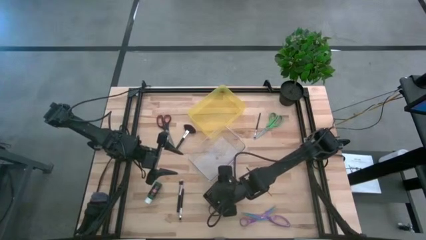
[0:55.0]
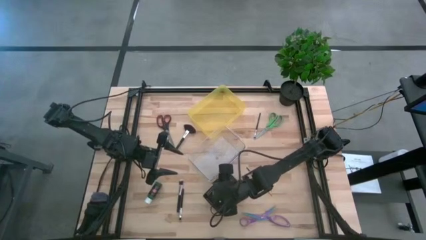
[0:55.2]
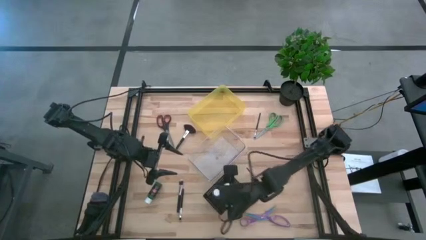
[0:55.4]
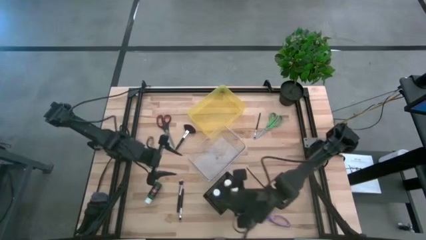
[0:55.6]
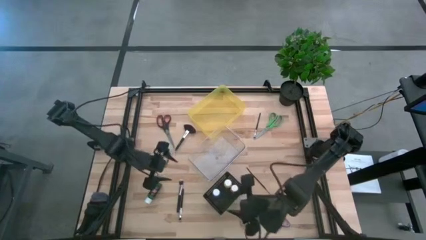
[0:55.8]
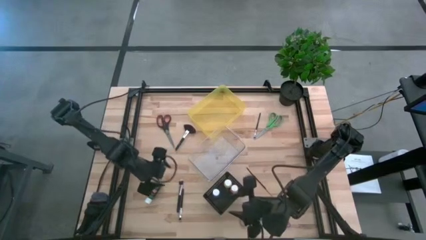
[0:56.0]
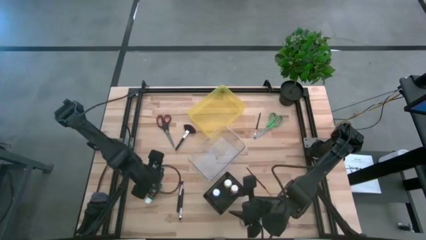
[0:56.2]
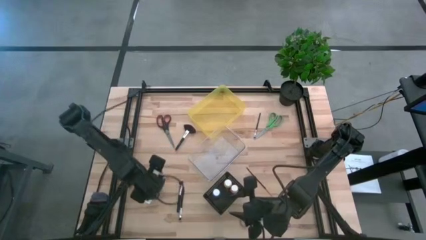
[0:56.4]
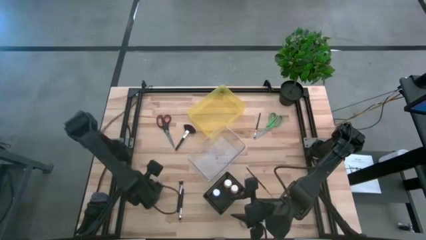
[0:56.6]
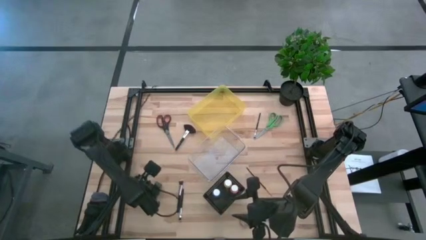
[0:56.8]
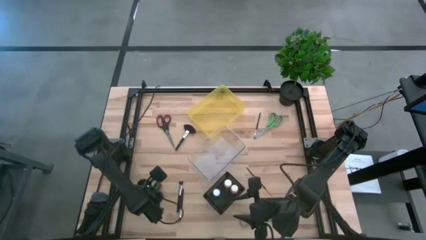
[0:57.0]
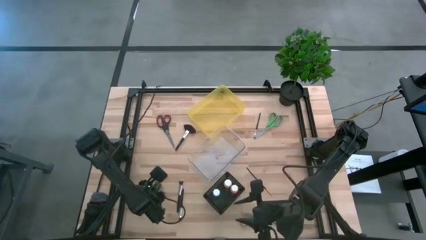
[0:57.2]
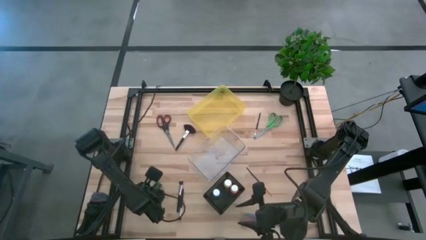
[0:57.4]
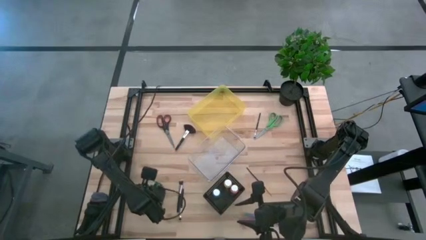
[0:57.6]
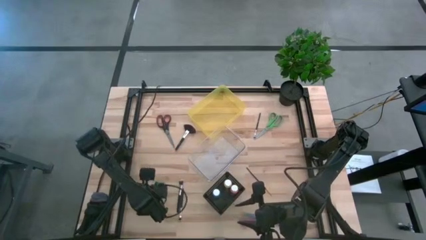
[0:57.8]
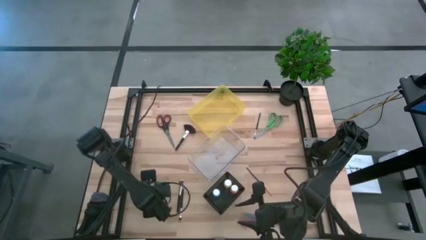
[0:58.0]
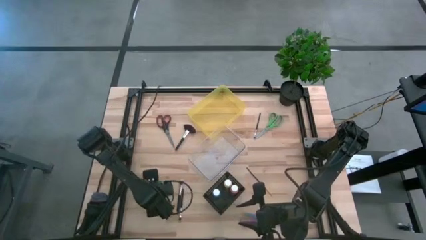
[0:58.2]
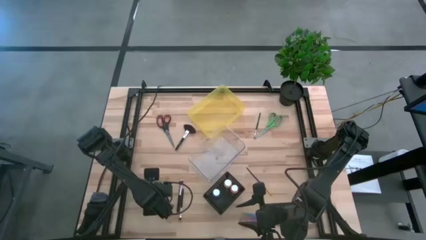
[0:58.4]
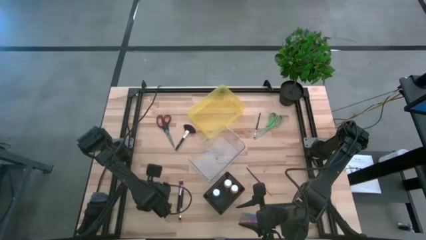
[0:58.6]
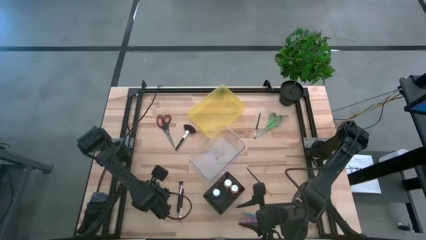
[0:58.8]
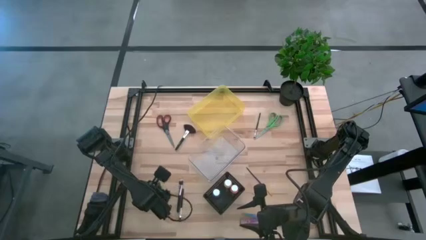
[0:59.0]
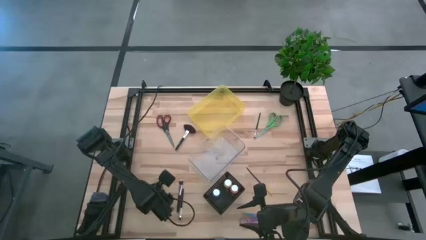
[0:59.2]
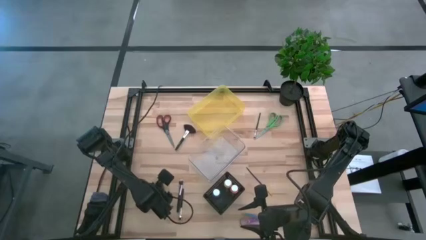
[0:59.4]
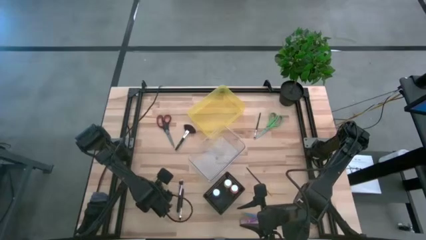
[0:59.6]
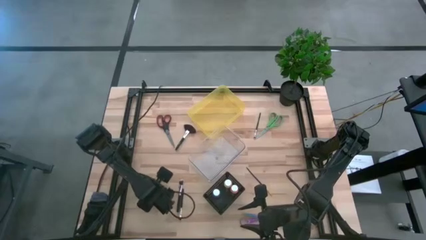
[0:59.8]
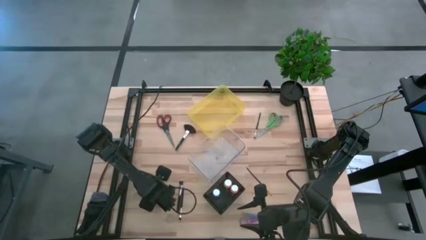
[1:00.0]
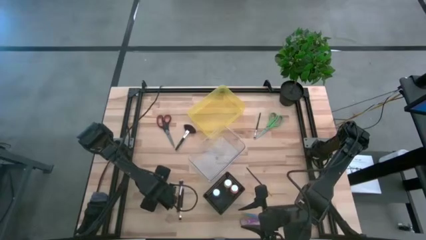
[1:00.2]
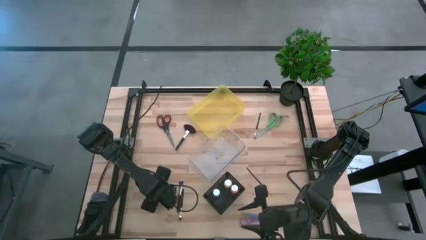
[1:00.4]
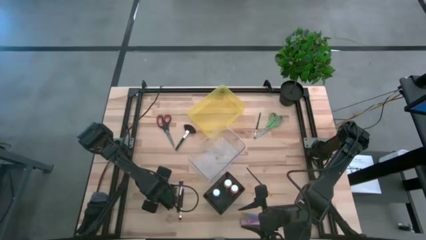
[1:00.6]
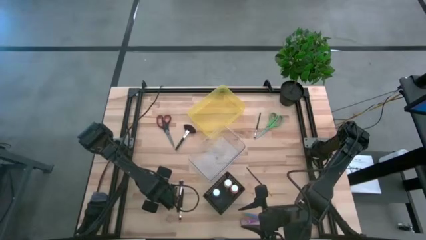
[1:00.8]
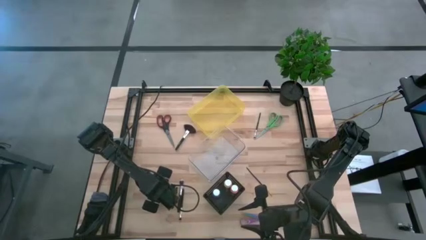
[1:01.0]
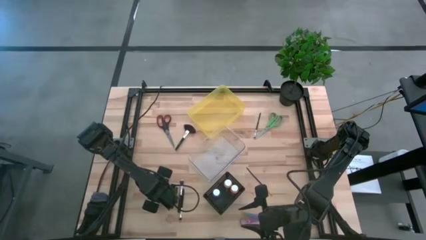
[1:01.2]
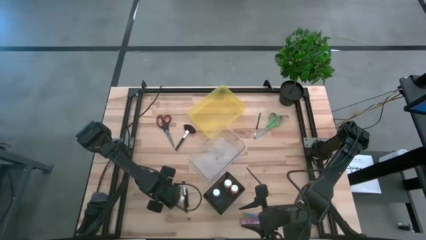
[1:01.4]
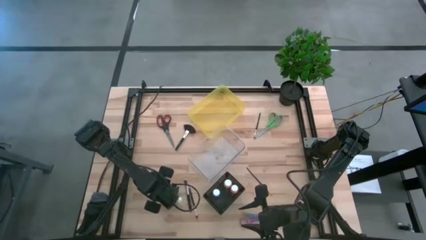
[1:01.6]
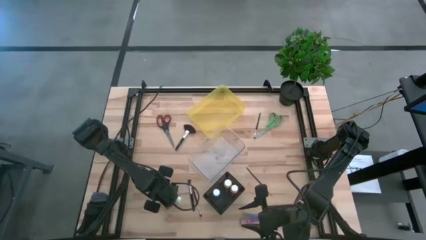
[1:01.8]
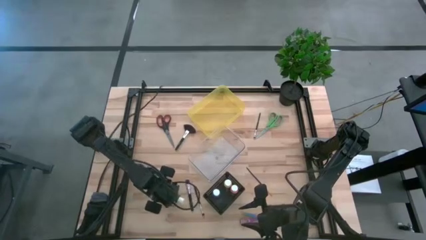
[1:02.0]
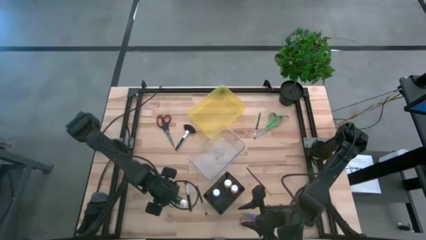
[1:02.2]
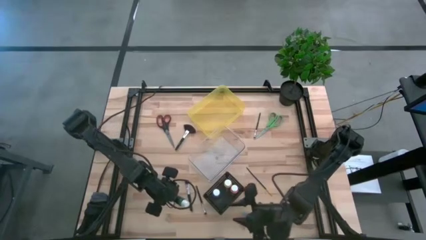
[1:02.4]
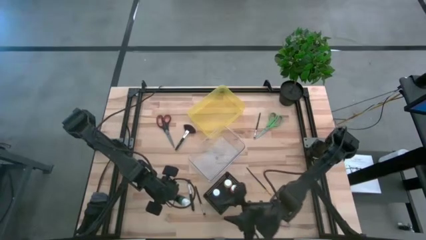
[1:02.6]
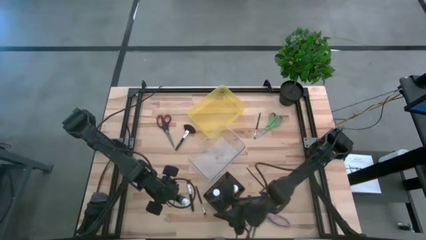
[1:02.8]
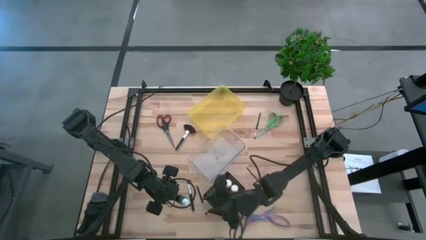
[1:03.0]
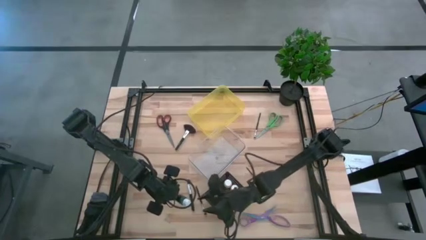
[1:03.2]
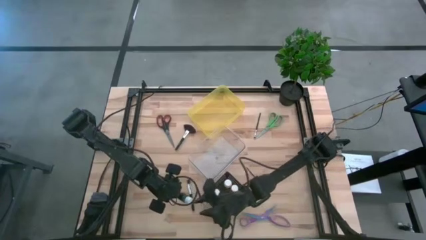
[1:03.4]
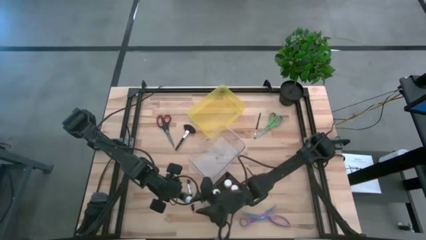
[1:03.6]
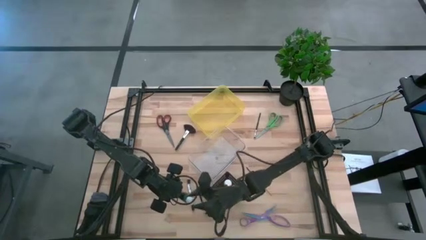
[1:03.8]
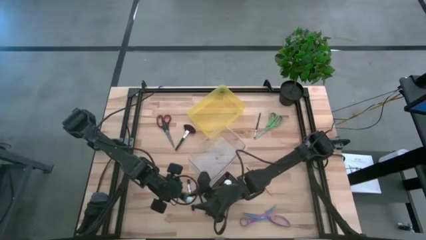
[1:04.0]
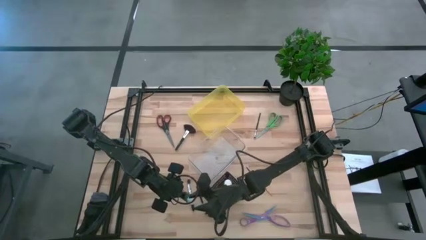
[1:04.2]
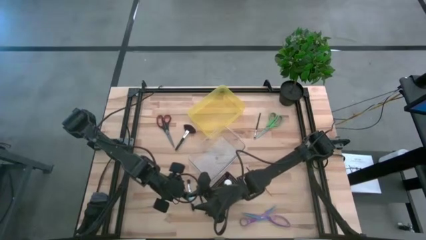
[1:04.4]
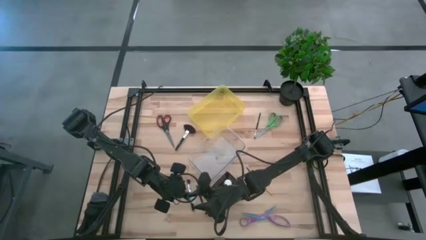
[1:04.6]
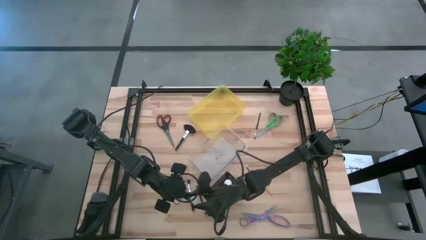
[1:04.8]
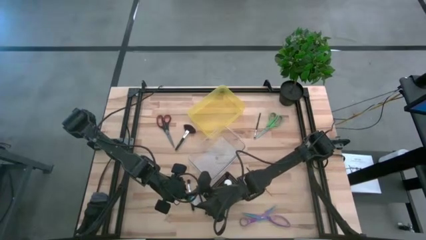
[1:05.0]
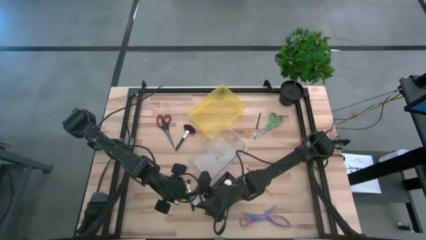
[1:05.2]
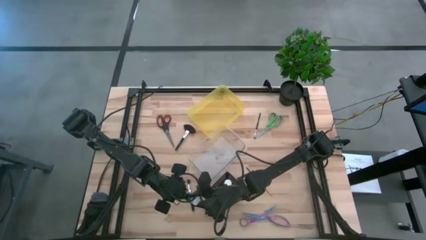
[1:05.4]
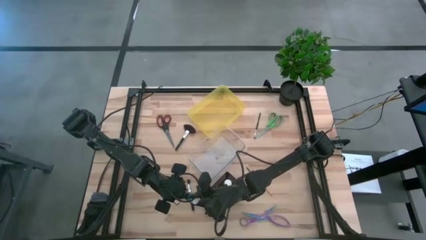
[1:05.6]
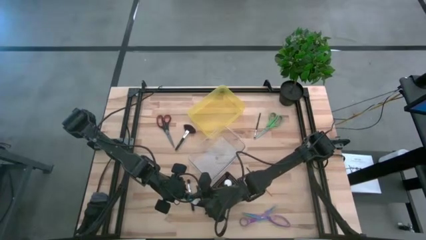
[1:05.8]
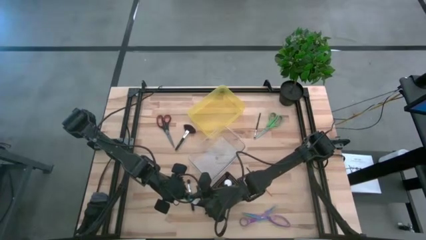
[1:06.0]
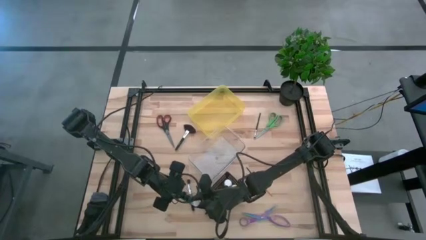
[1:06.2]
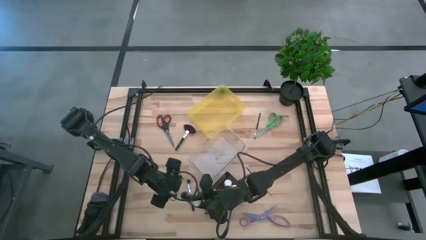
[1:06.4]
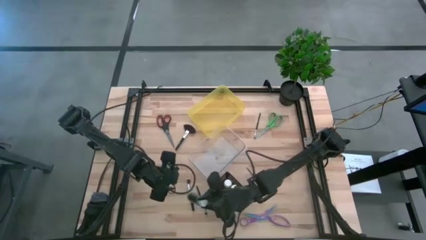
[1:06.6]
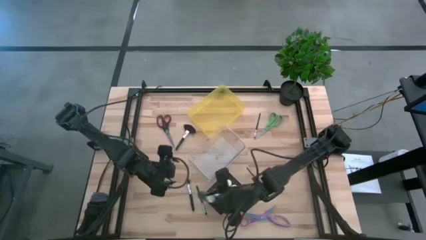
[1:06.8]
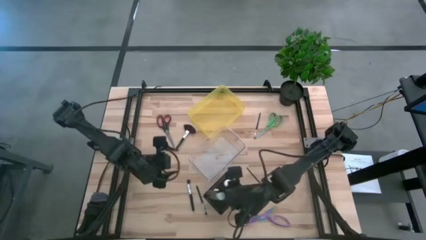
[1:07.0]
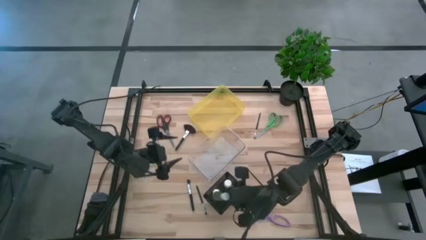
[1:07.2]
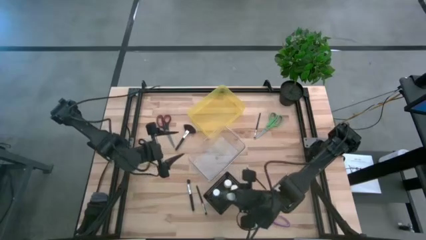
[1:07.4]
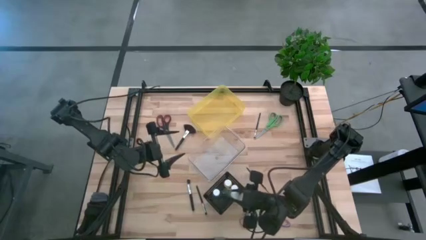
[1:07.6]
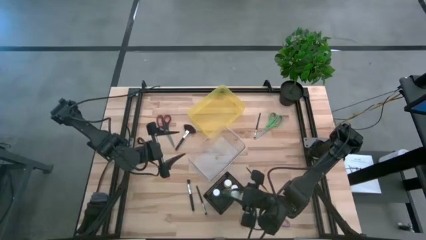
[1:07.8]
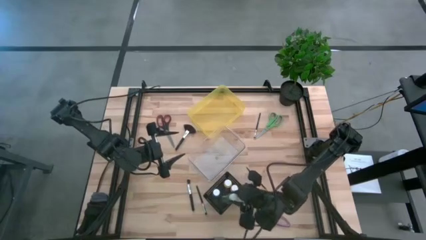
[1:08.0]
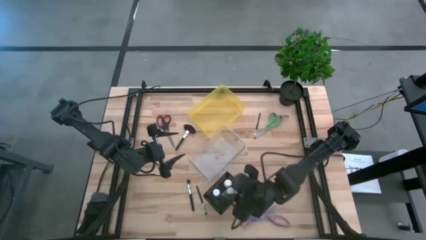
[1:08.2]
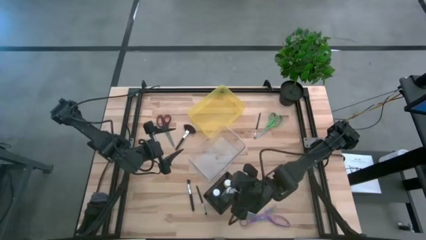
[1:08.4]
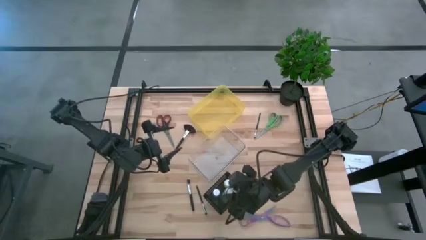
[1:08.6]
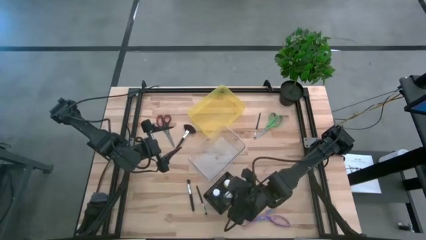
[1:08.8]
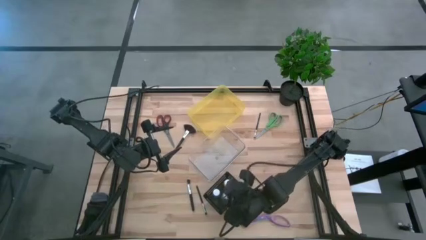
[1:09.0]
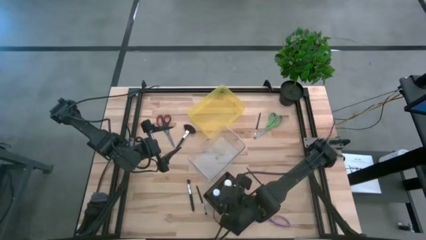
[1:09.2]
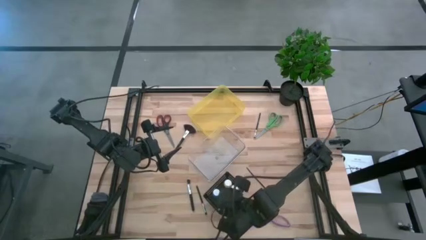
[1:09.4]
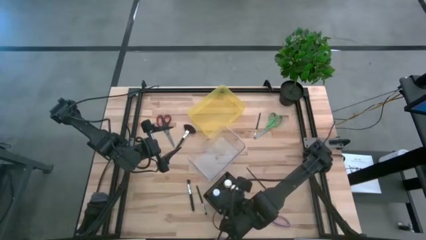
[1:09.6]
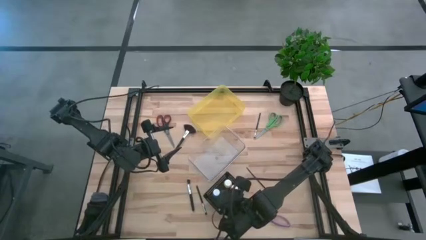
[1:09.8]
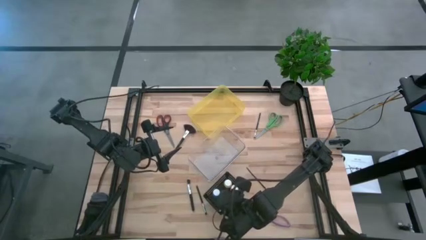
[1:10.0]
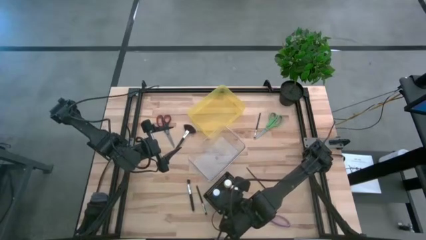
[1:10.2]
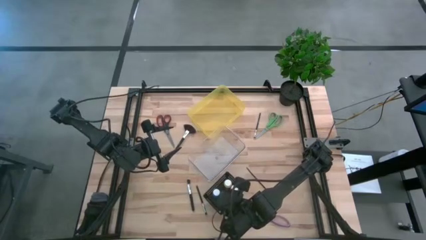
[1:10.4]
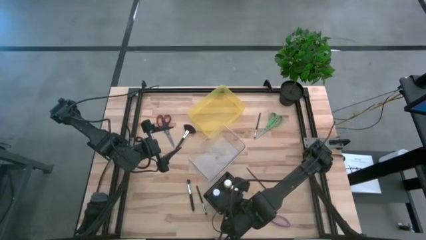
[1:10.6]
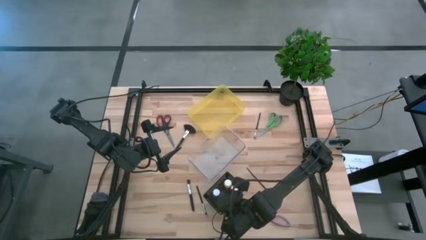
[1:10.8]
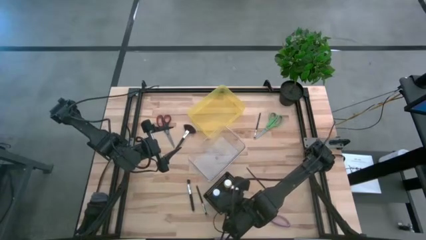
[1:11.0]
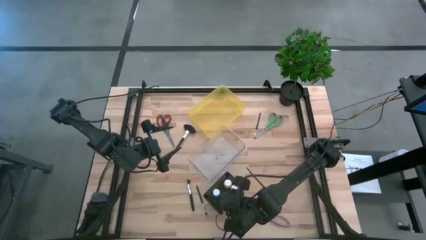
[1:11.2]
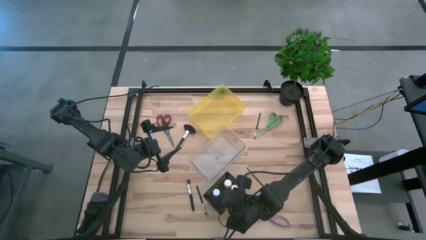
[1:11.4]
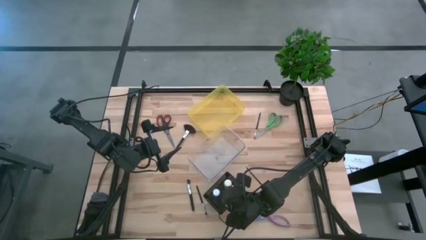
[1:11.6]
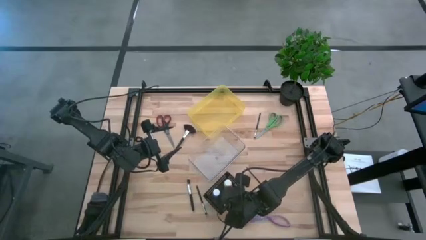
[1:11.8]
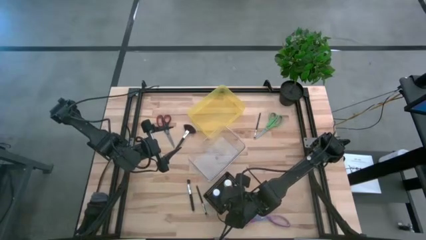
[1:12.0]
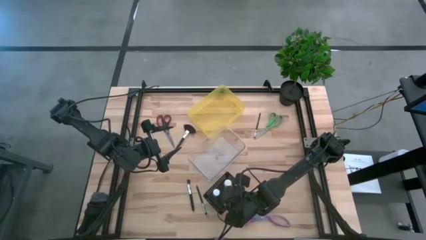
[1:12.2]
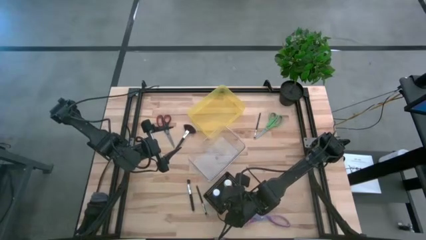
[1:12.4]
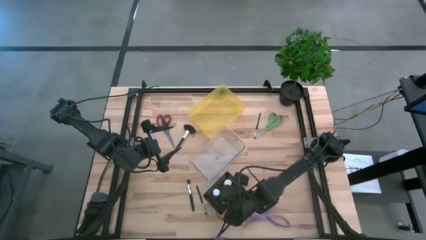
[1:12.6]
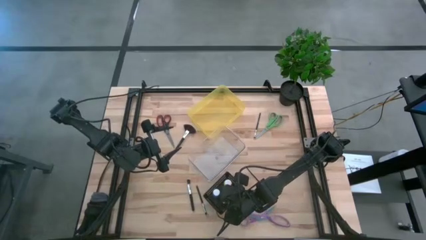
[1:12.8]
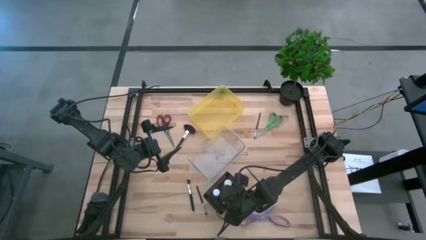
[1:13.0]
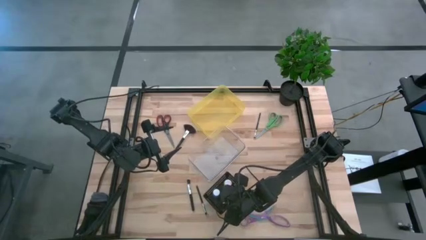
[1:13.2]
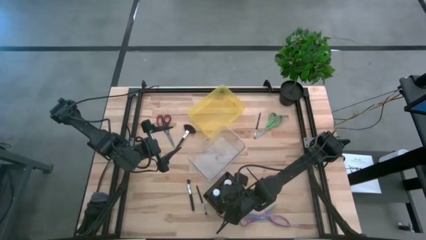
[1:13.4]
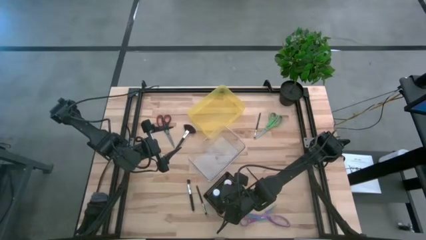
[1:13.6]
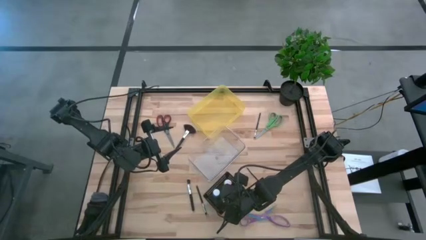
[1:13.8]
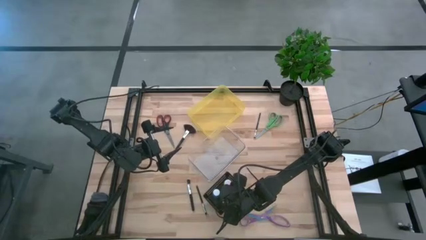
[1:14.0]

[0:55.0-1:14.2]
Task: Pick & Place Paint Supplies
Put the green paint bottle into the black bin
